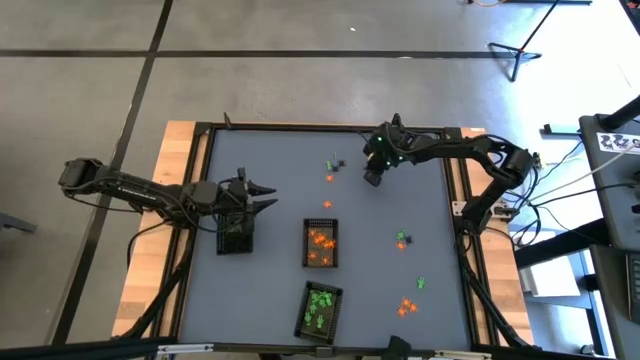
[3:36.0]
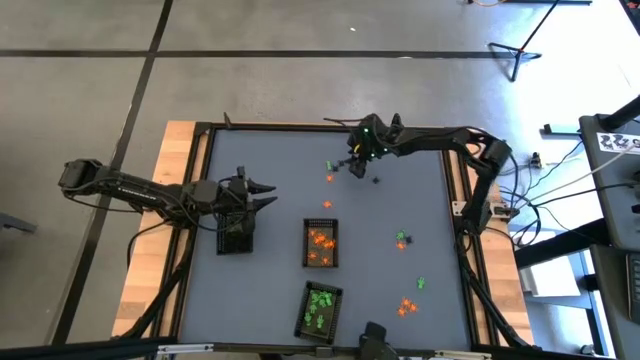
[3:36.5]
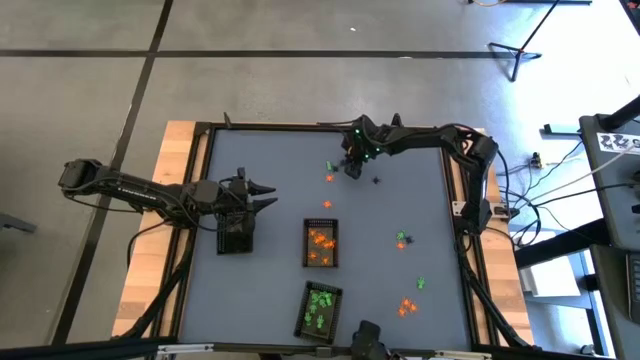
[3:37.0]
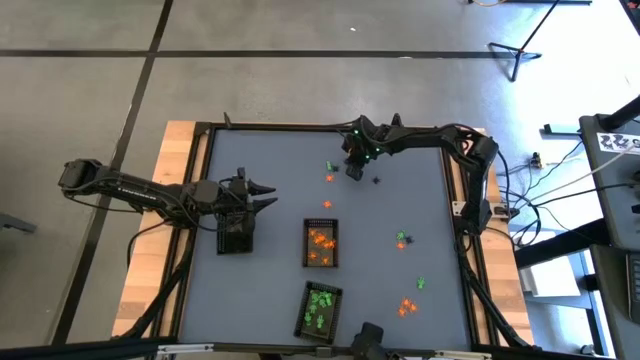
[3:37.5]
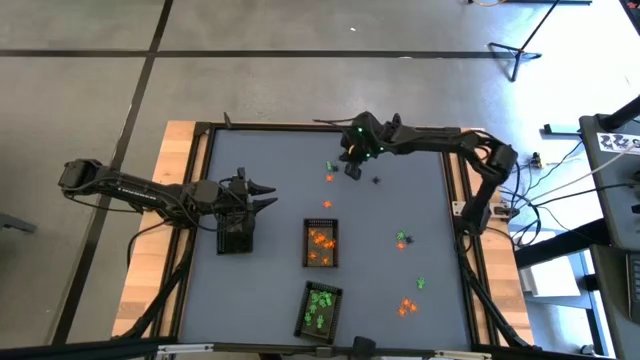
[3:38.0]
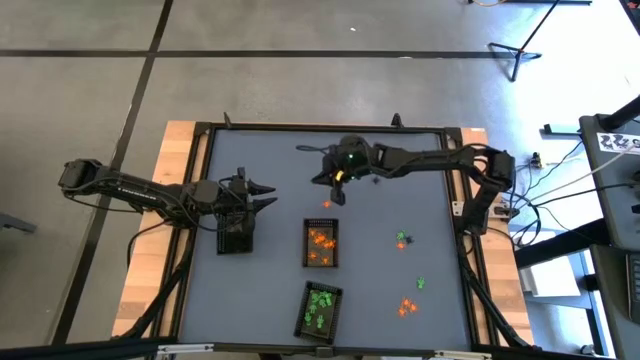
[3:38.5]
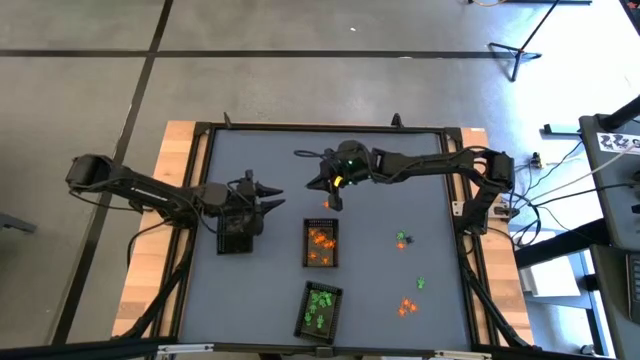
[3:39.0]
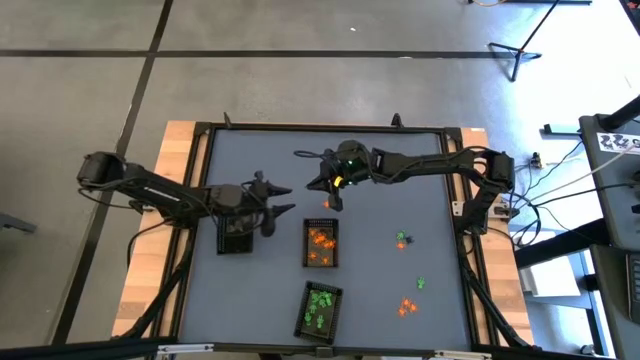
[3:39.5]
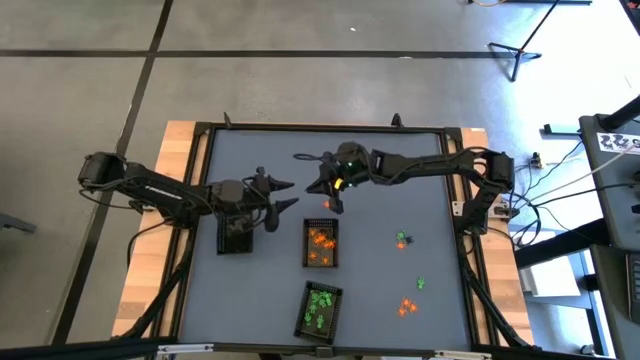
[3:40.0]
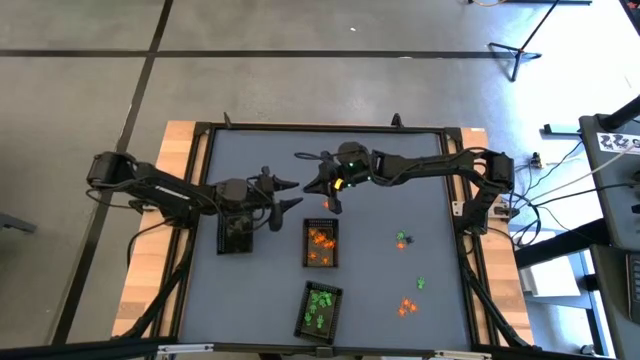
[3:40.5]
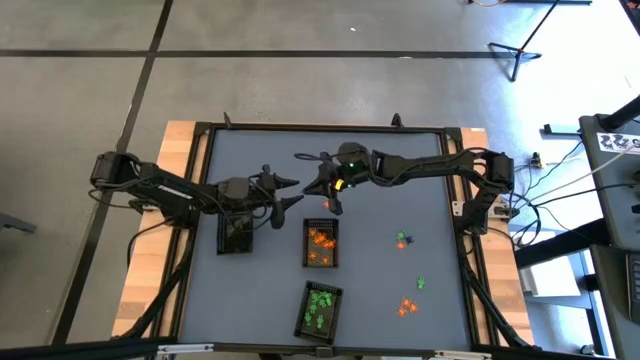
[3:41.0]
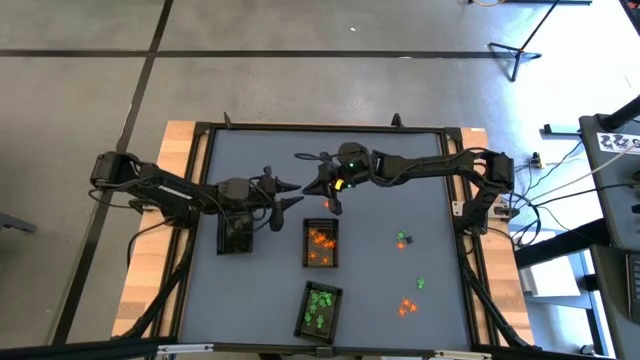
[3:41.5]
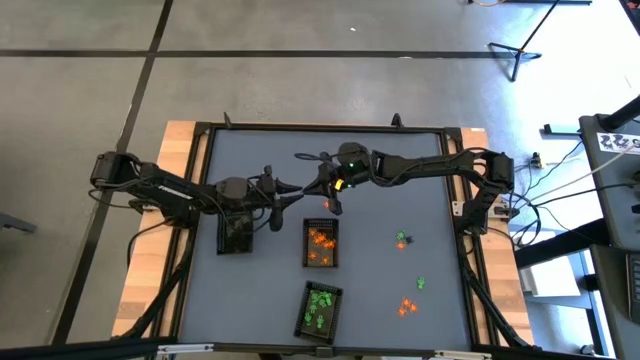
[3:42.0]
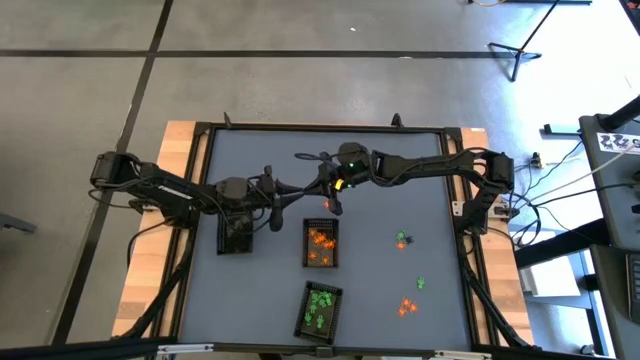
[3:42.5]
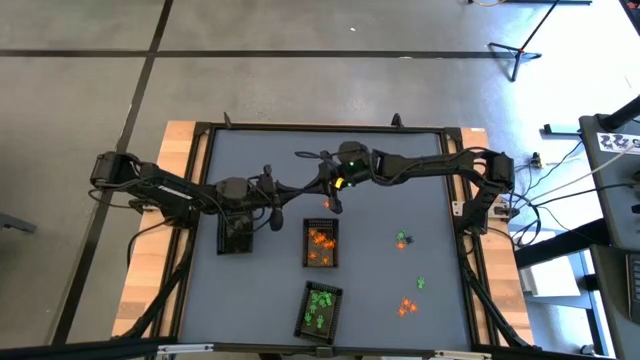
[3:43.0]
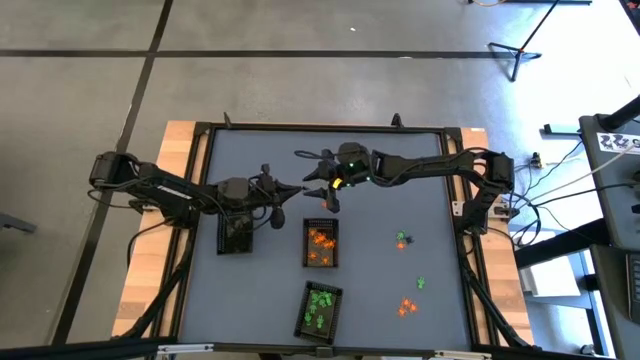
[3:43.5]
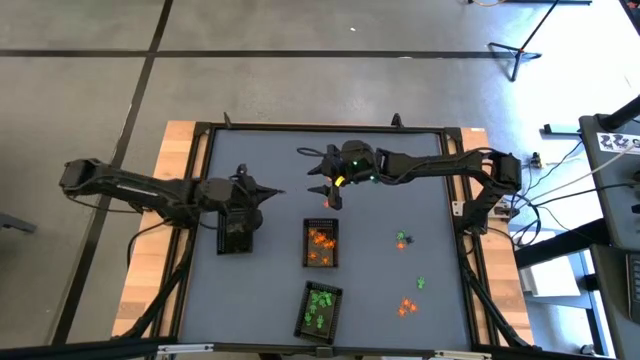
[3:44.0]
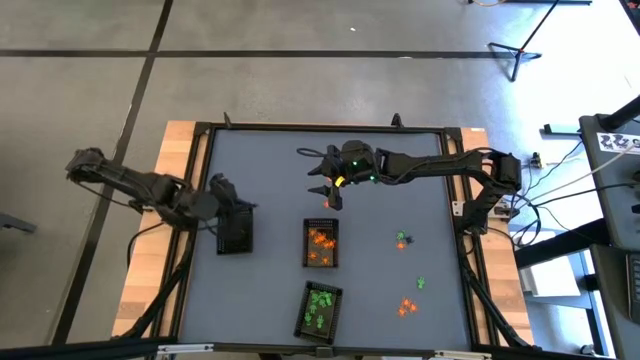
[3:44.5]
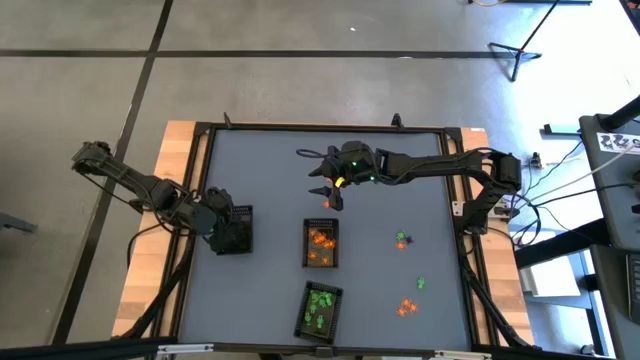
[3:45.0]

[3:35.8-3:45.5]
Task: Sort Halloween decoration
Put the black spider toy into the top left black basket

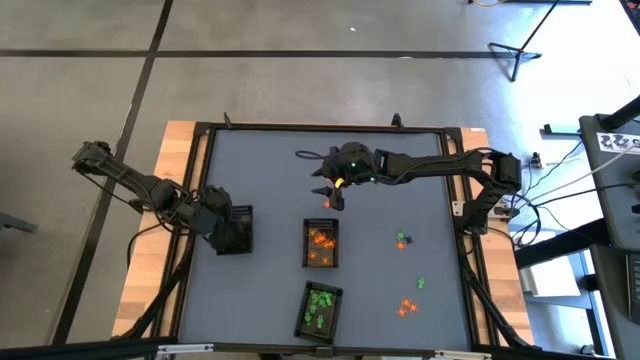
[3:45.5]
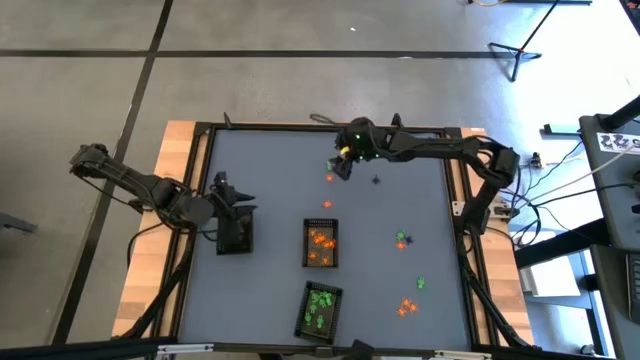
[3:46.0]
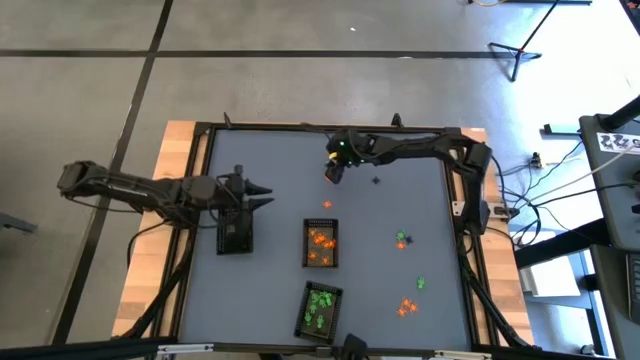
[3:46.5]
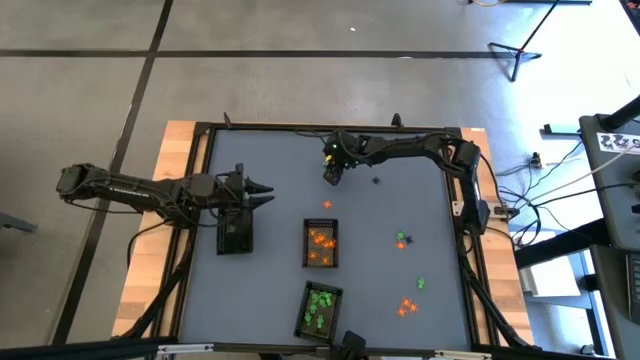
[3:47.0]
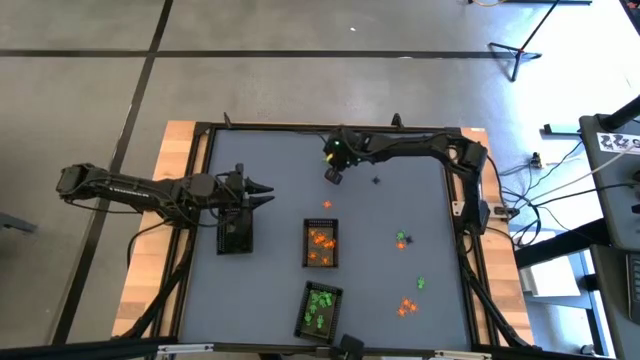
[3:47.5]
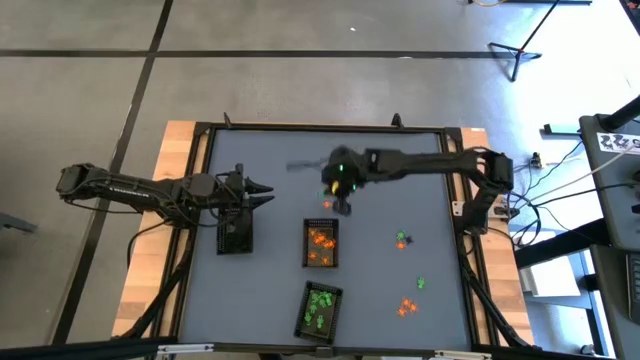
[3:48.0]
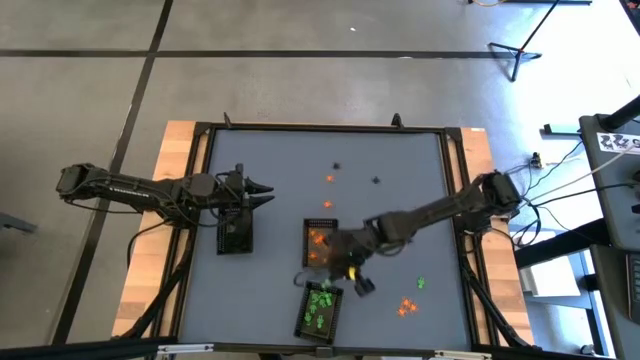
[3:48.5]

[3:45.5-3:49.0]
Put the green toy skeleton into the bottom black basket

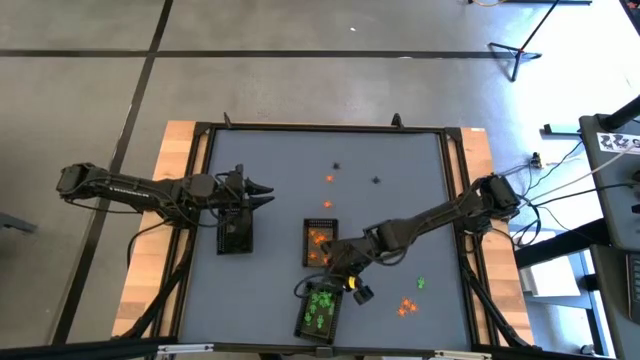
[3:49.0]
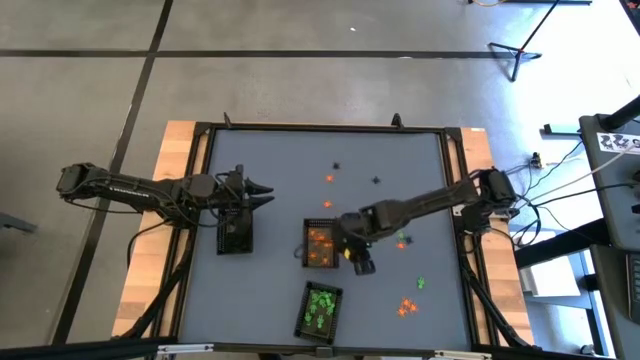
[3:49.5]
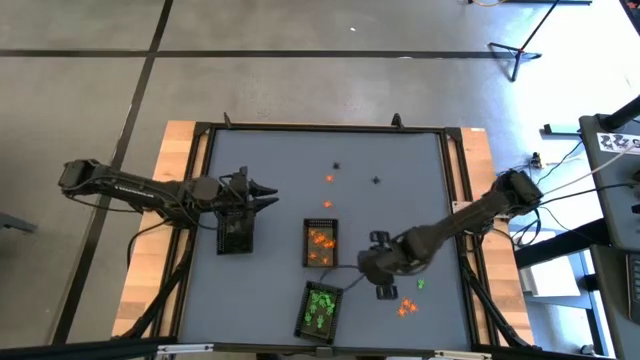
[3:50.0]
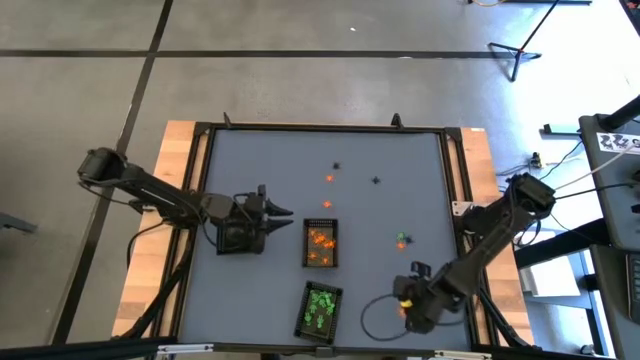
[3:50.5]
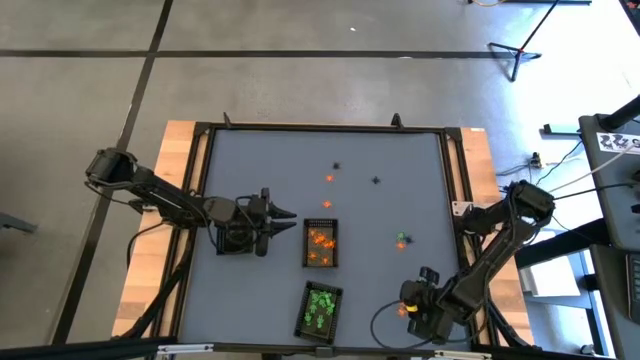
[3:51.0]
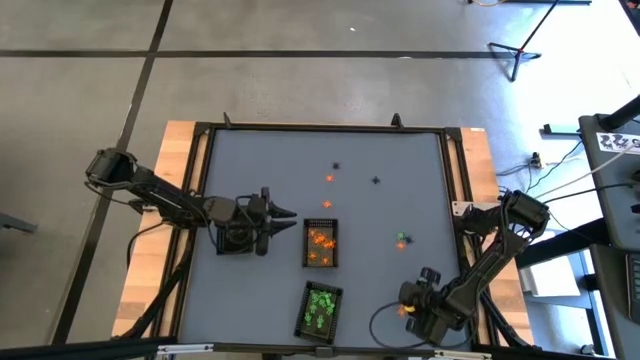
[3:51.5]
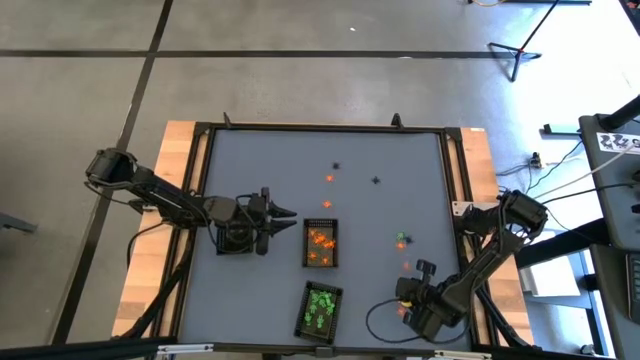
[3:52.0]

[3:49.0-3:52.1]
Put the orange spider toy into the top right black basket

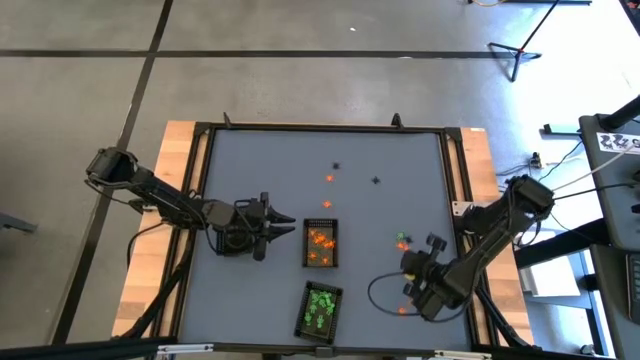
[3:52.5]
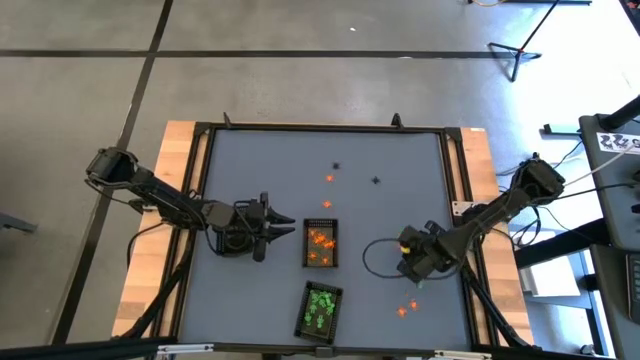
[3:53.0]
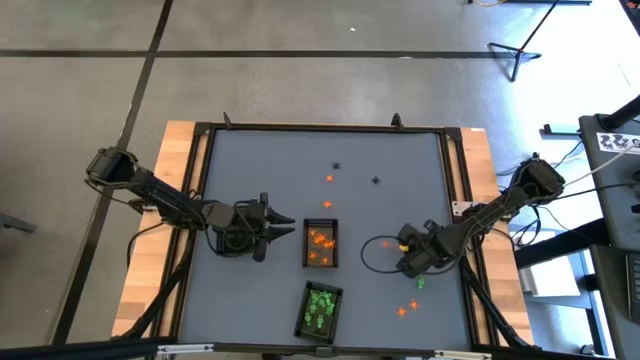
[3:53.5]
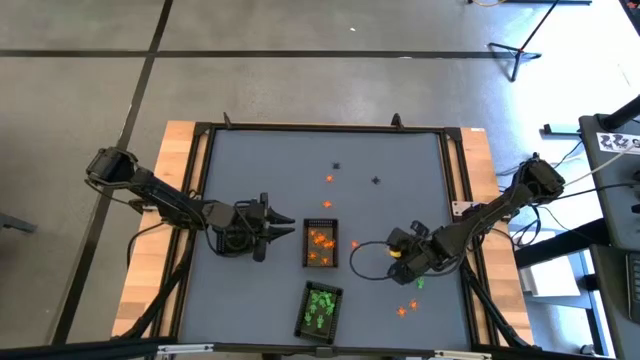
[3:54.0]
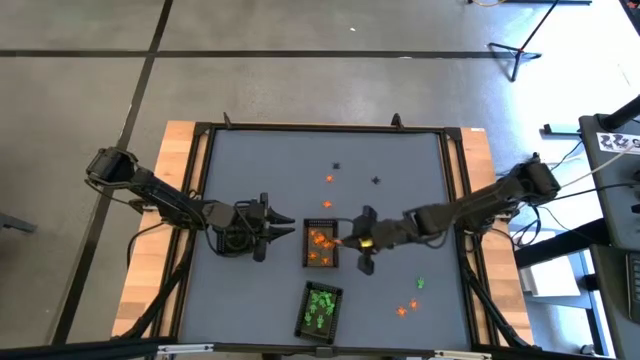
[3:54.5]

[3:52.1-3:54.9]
Put the orange spider toy into the top right black basket

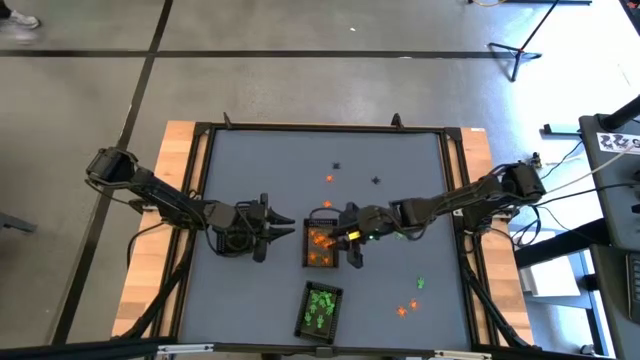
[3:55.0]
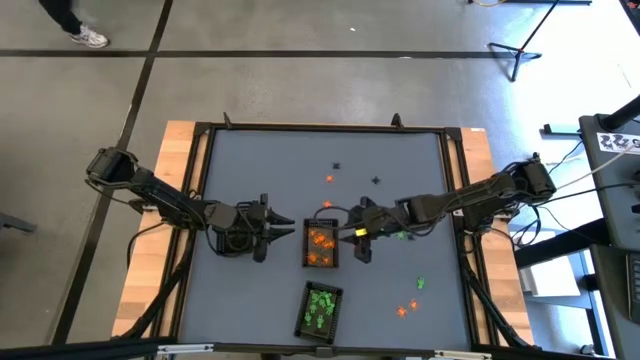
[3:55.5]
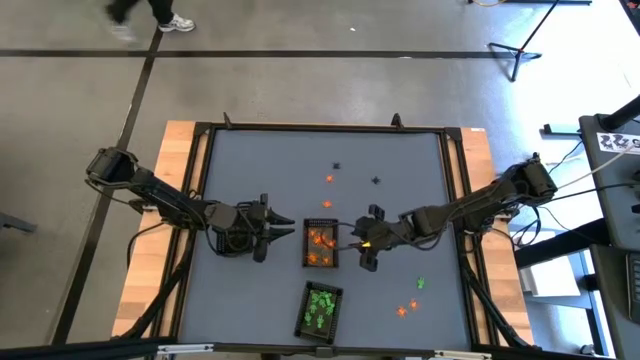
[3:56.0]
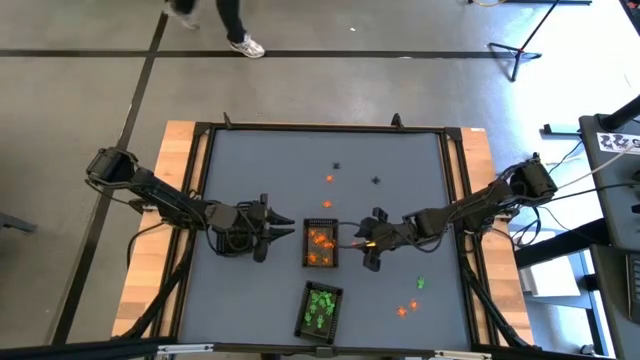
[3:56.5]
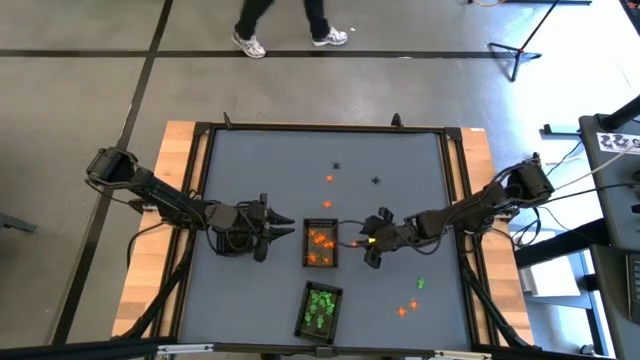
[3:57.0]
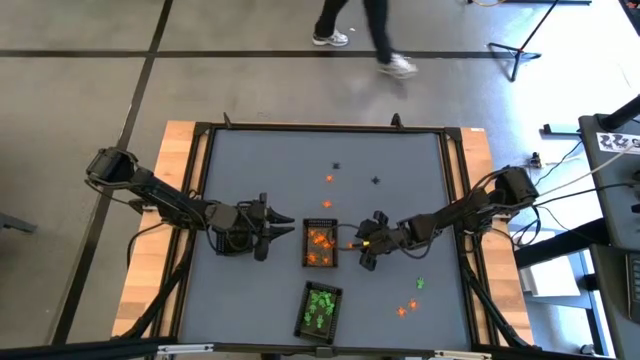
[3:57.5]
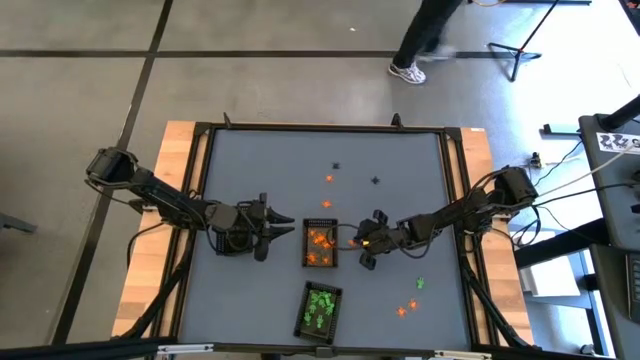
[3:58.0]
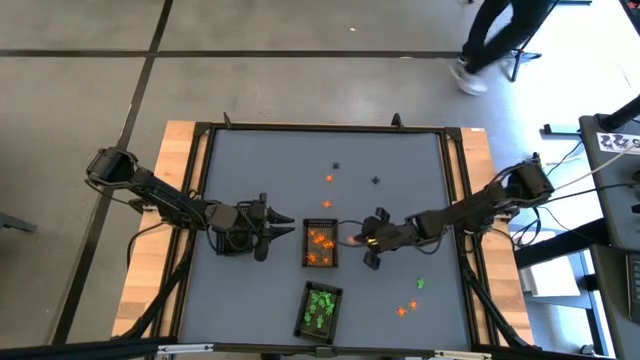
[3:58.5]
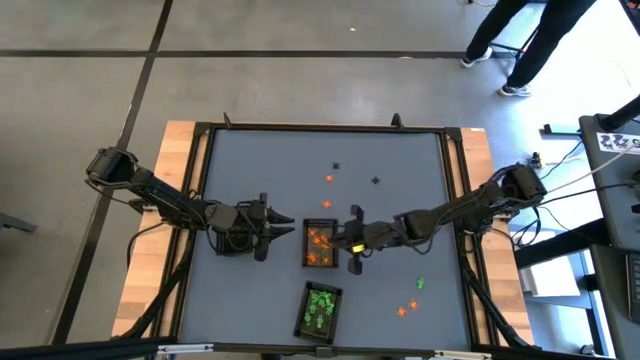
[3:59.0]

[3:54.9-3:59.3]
Put the orange spider toy into the top right black basket
